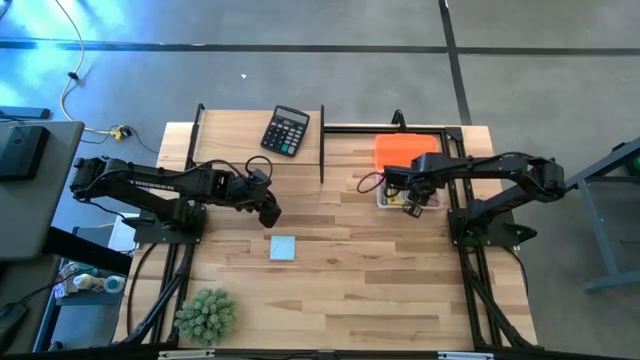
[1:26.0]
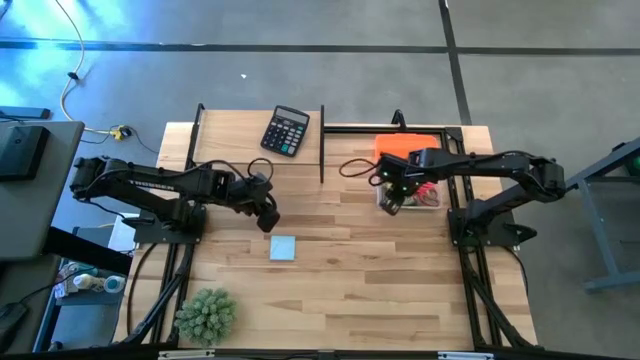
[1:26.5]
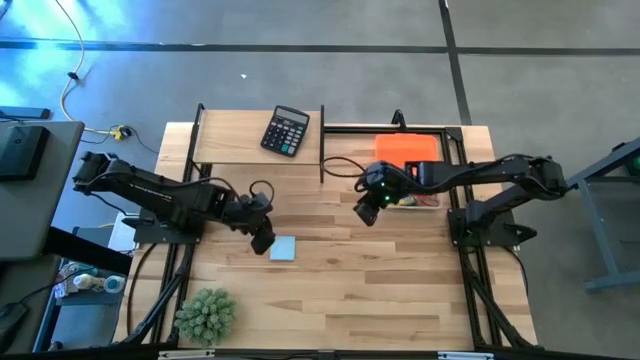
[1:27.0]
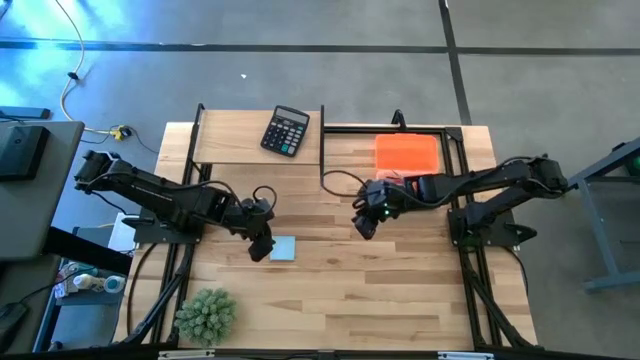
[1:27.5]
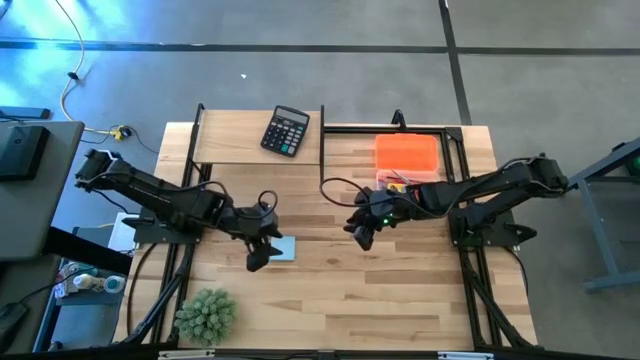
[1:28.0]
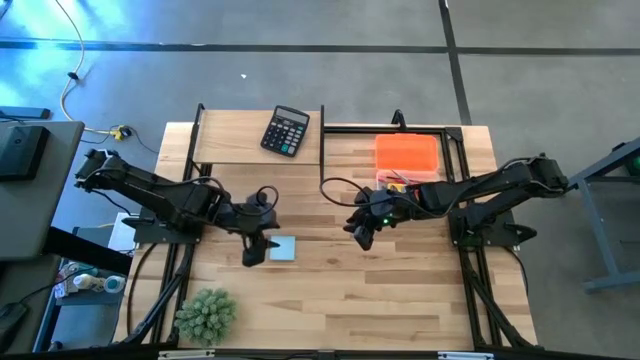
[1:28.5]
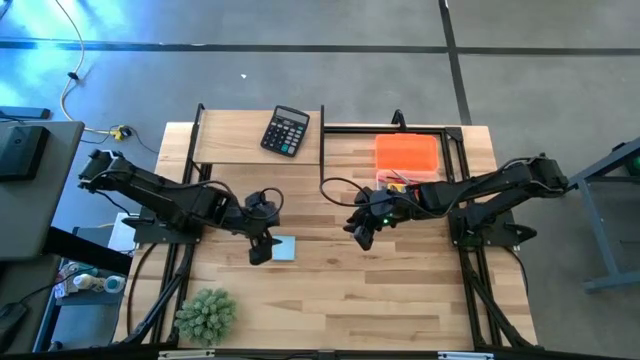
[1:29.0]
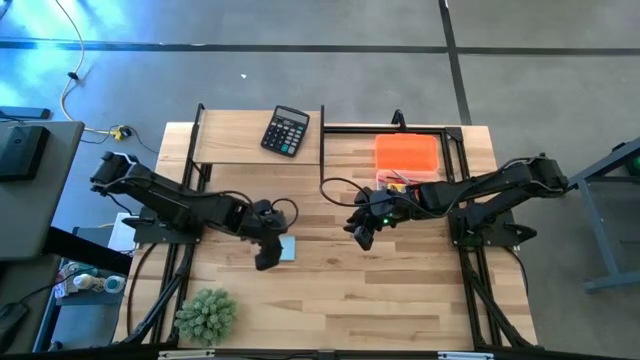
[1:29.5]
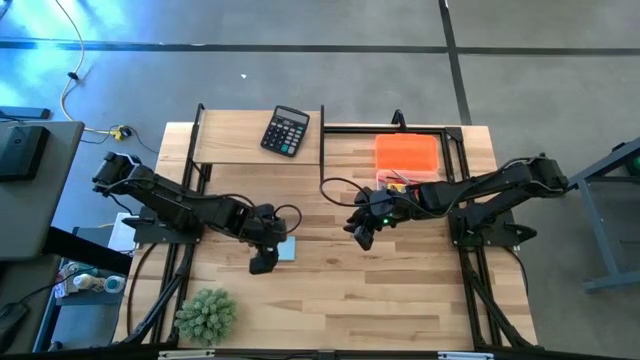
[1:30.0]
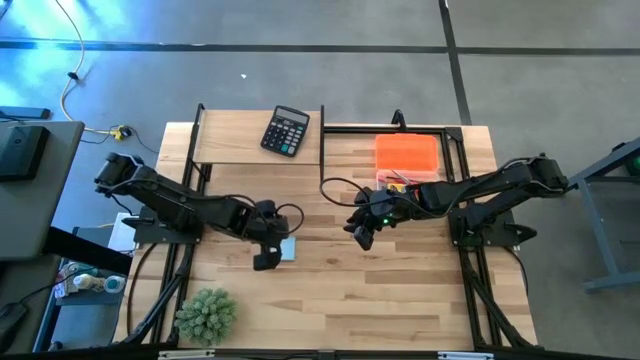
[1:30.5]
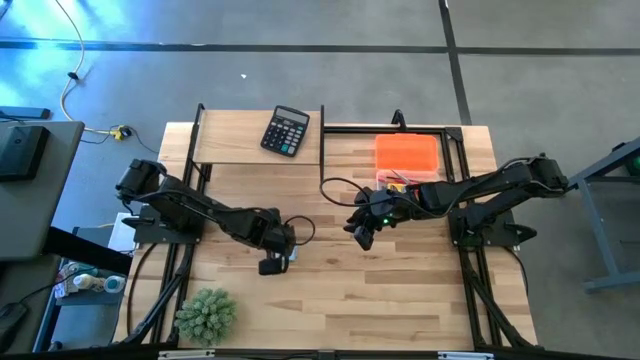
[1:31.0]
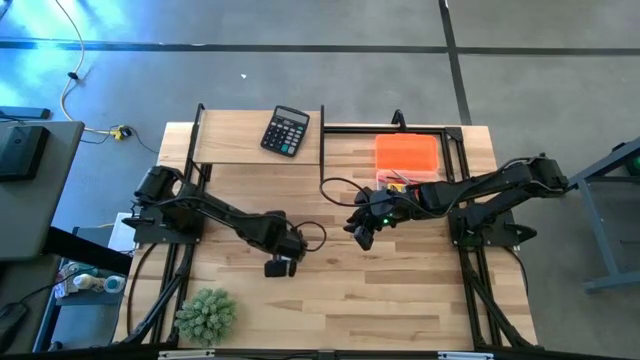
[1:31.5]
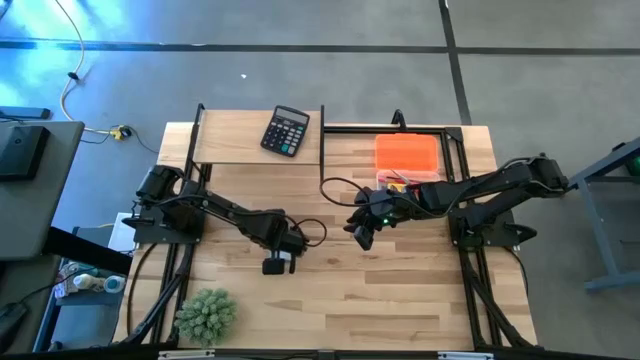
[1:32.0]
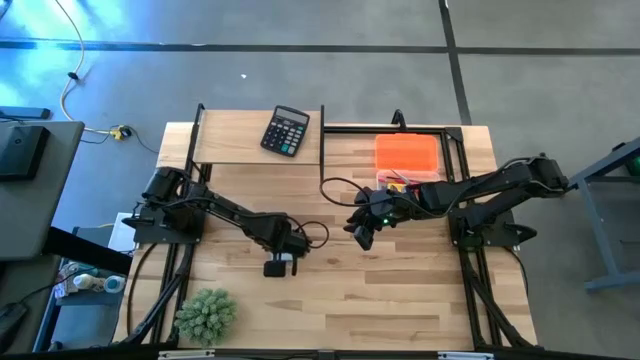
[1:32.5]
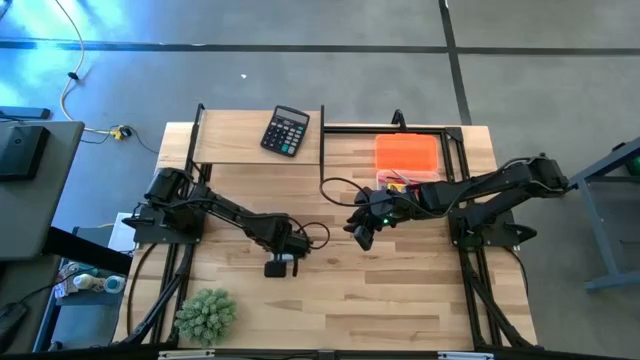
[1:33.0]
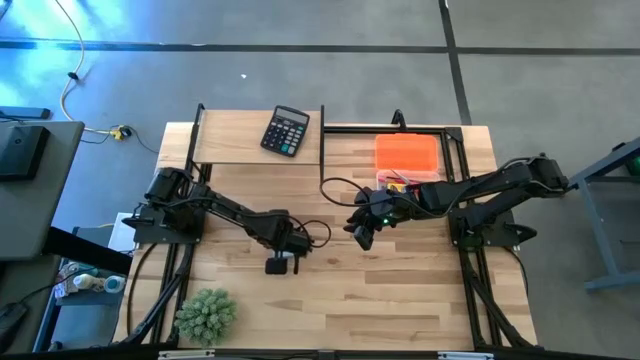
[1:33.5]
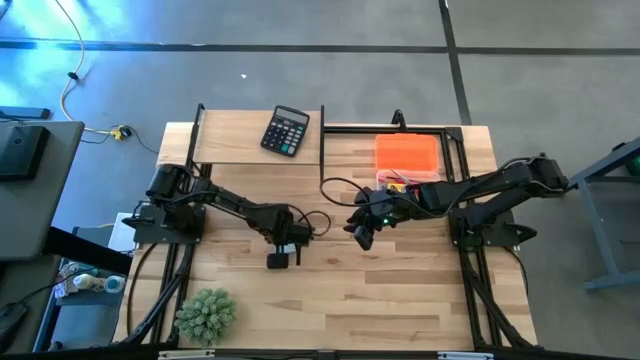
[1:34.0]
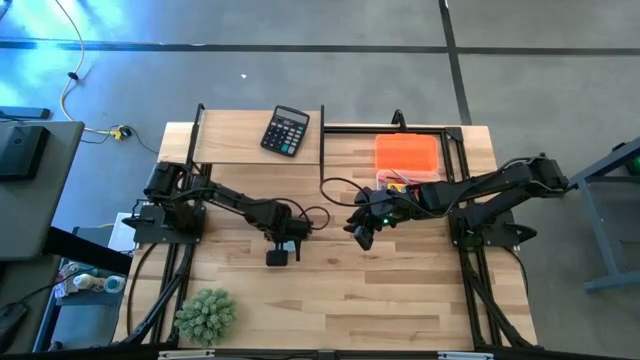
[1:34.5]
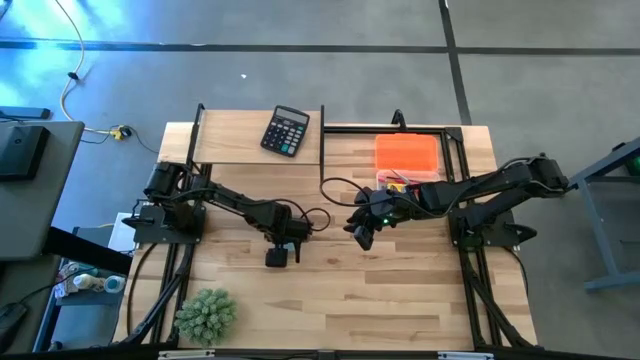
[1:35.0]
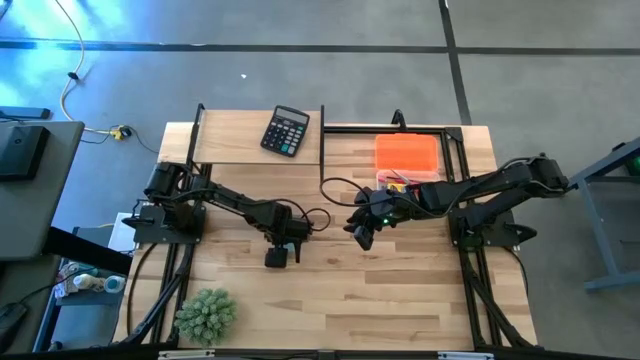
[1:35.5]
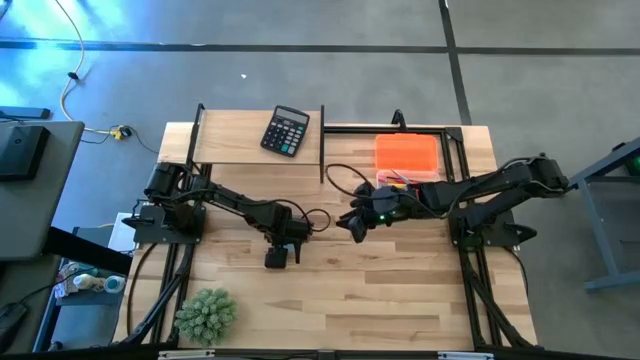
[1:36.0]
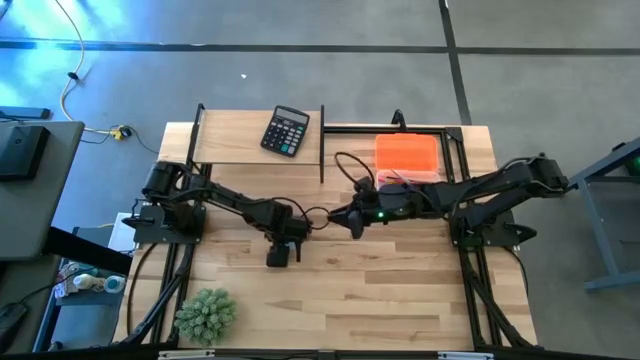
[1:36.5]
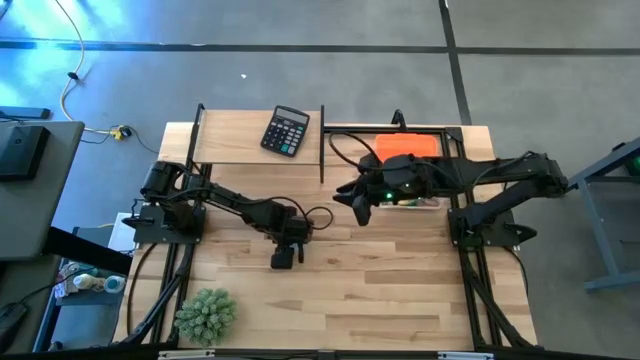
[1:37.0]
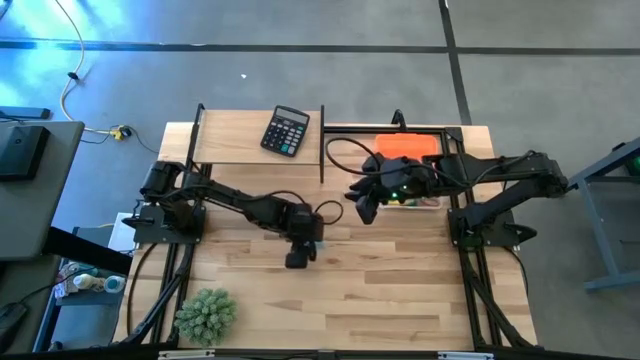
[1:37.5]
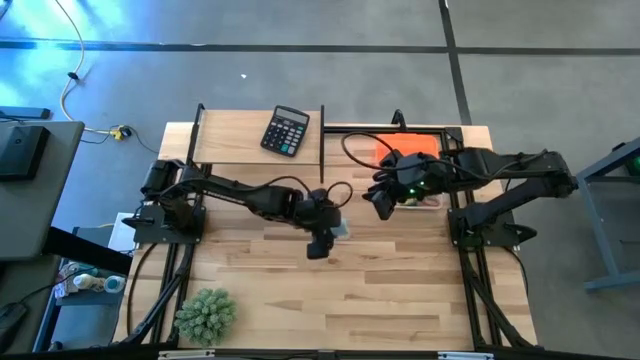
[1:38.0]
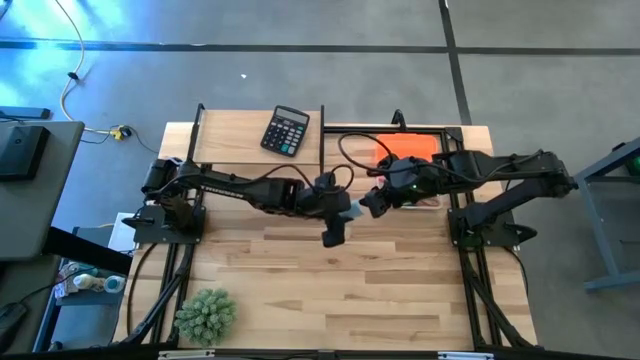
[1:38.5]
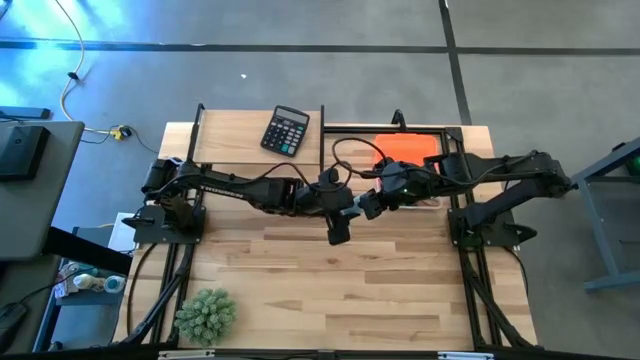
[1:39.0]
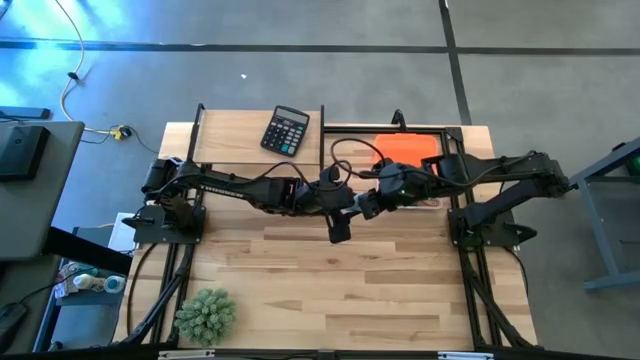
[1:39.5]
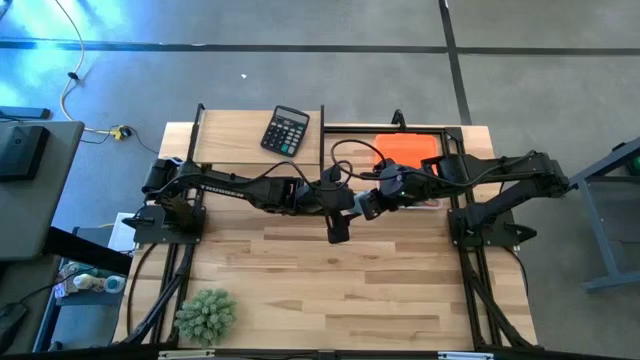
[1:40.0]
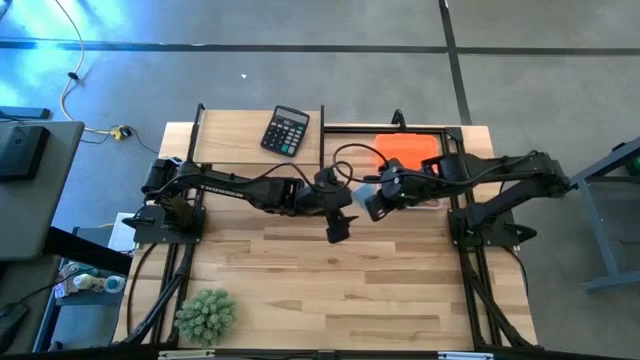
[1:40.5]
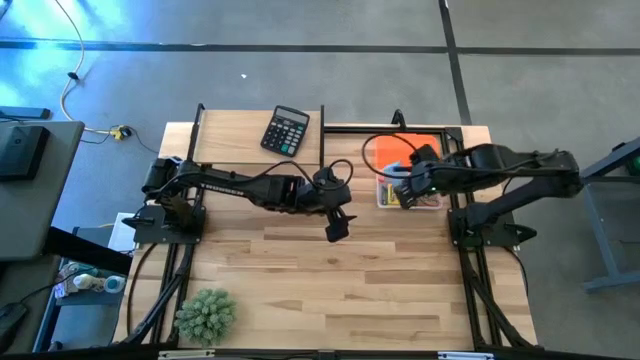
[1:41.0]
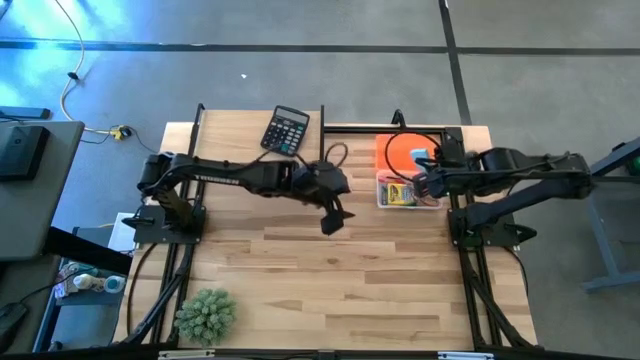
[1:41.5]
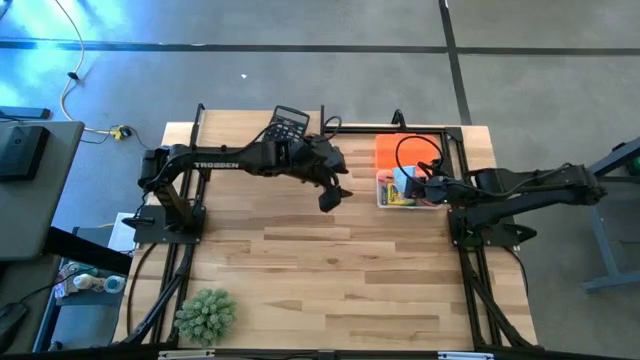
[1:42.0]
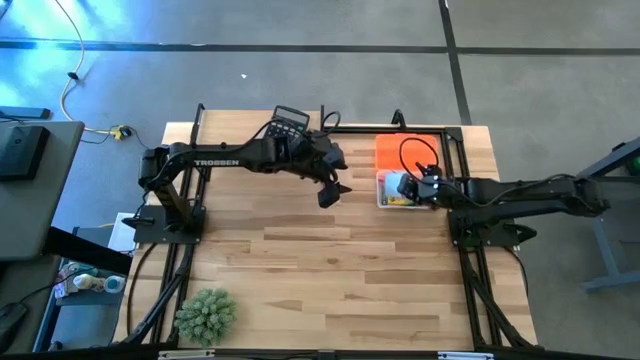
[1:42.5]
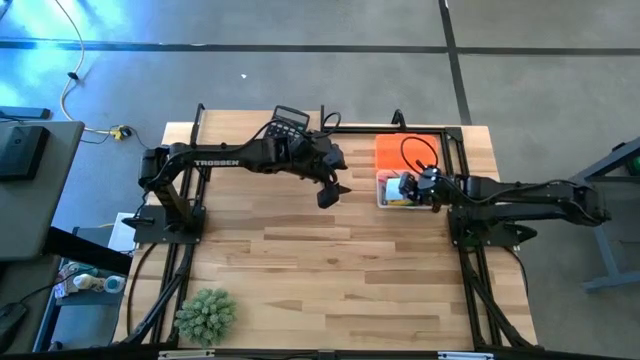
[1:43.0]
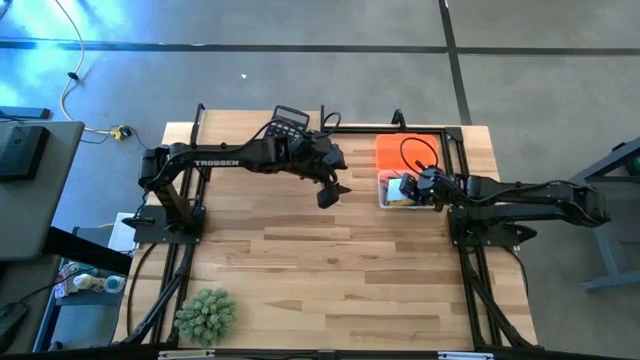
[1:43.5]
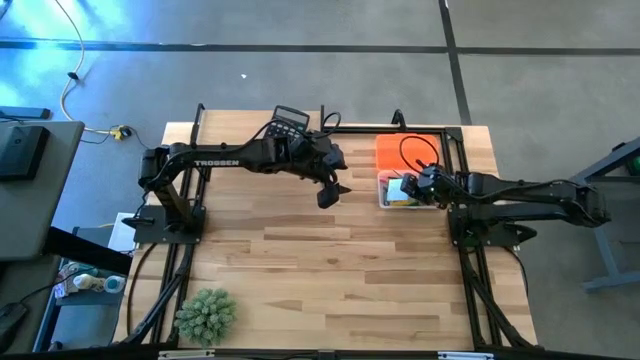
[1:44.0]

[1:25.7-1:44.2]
Task: Pack school essentials
Put the blue sticky notes into the orange supply box

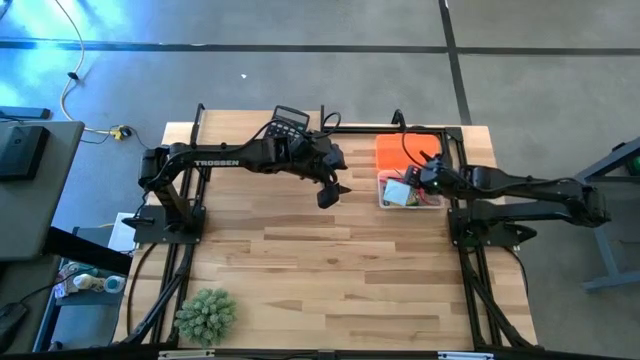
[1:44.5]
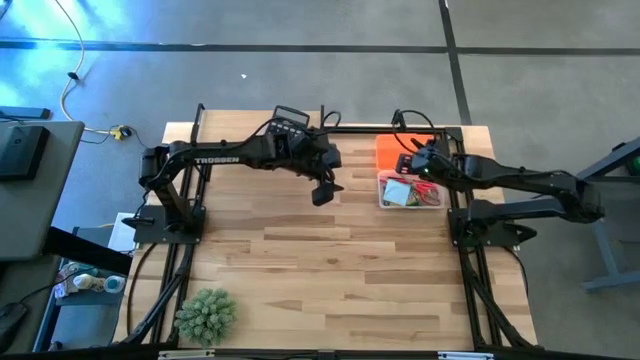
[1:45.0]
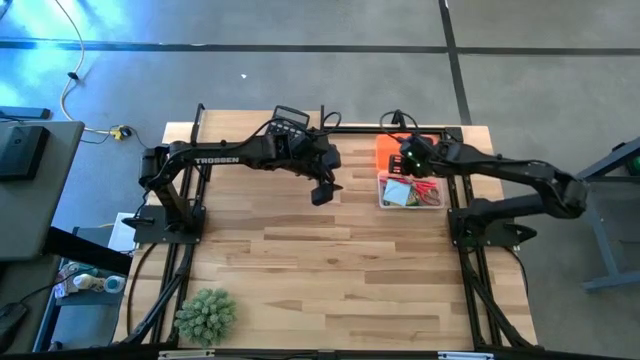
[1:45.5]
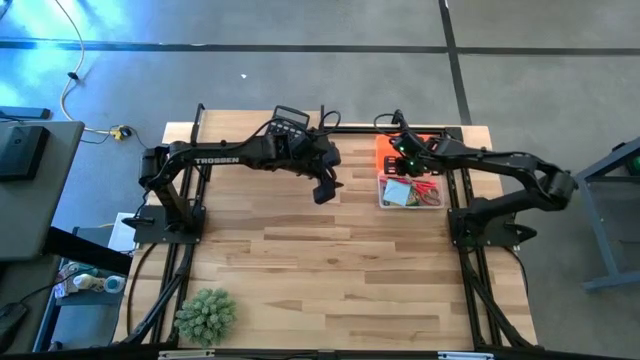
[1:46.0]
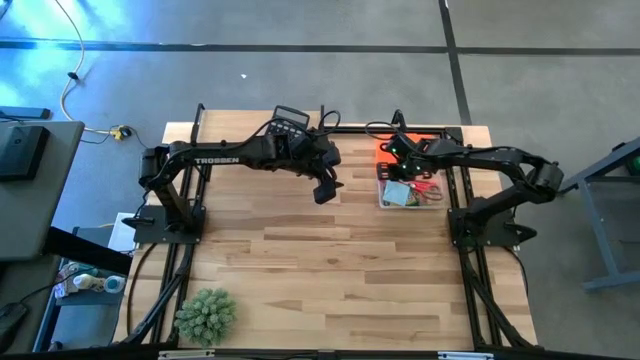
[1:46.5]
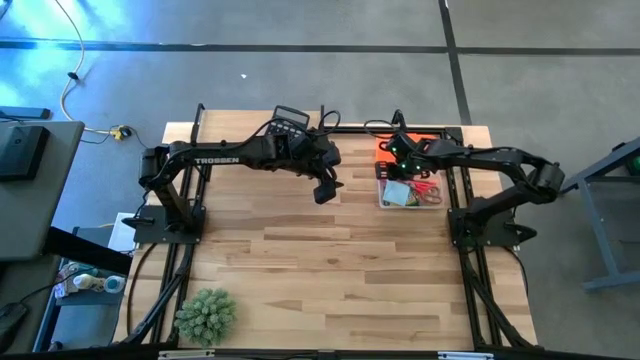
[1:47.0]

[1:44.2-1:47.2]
Adjust the red scissors
